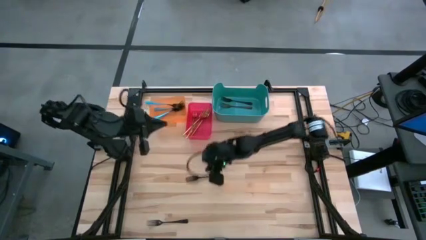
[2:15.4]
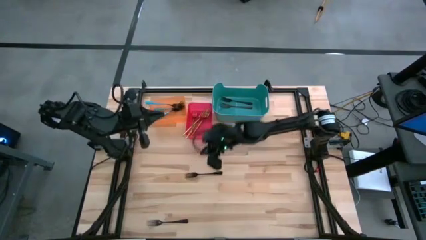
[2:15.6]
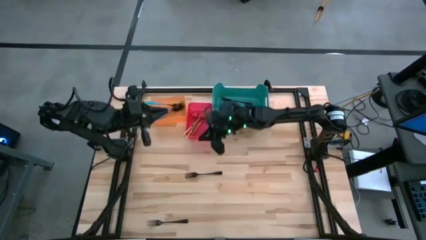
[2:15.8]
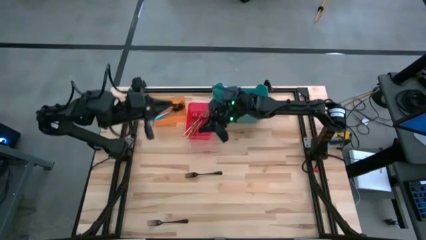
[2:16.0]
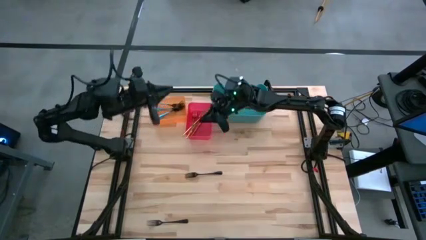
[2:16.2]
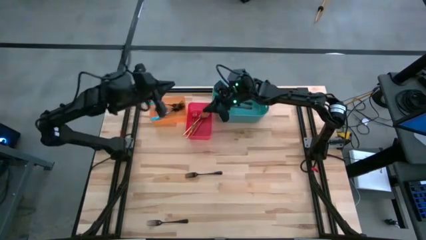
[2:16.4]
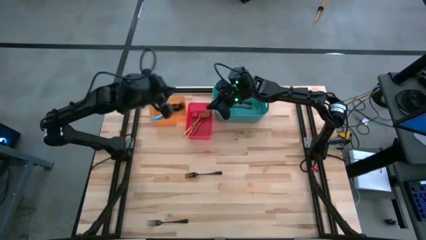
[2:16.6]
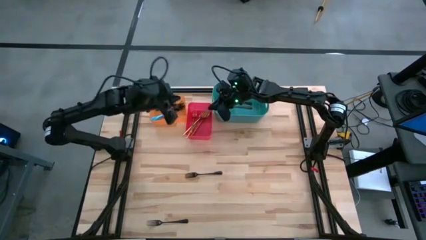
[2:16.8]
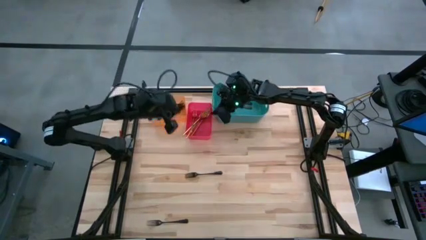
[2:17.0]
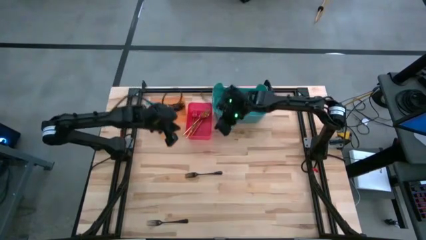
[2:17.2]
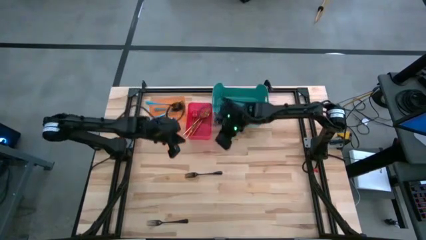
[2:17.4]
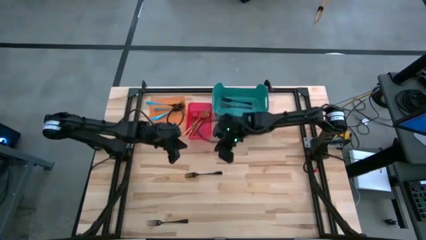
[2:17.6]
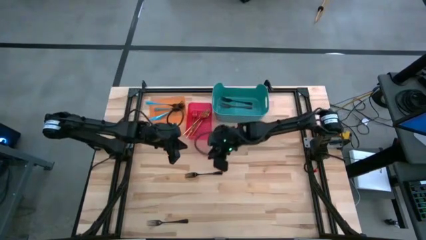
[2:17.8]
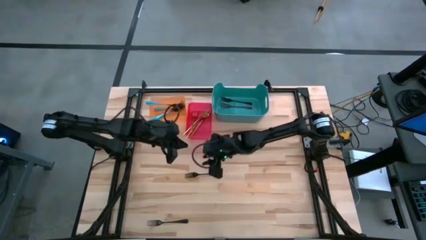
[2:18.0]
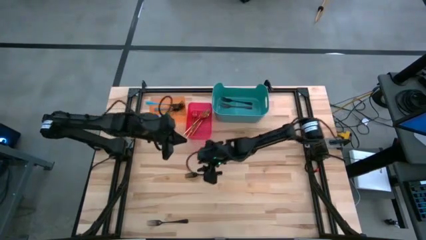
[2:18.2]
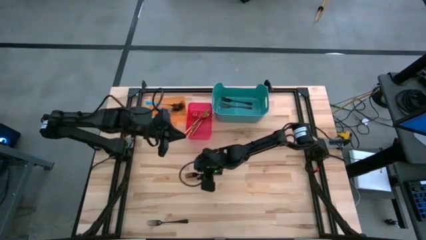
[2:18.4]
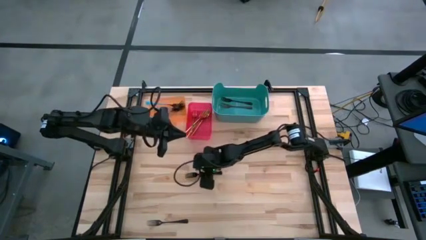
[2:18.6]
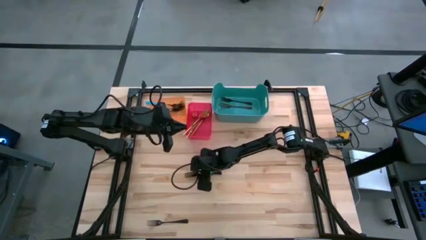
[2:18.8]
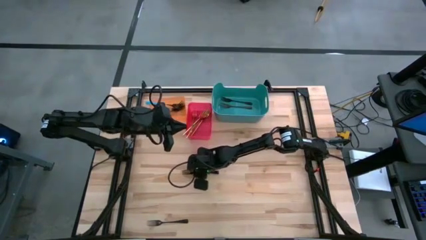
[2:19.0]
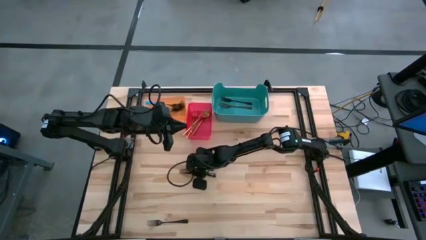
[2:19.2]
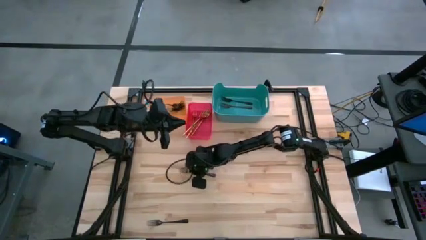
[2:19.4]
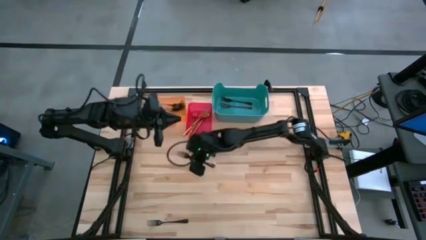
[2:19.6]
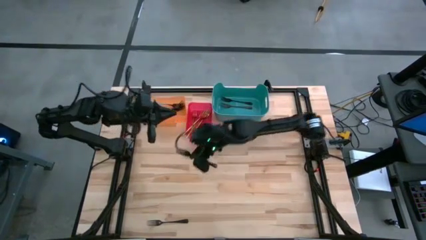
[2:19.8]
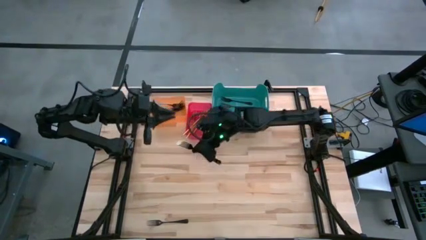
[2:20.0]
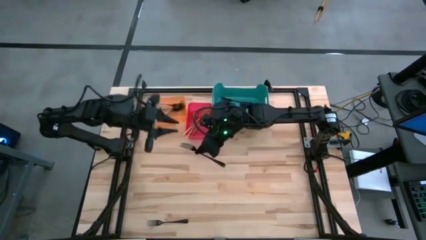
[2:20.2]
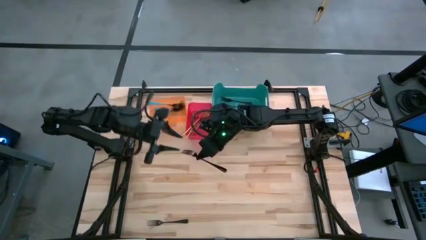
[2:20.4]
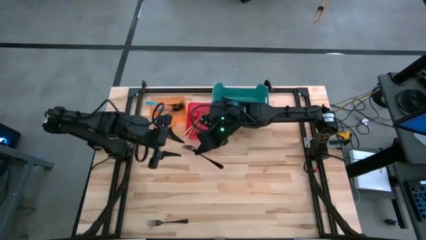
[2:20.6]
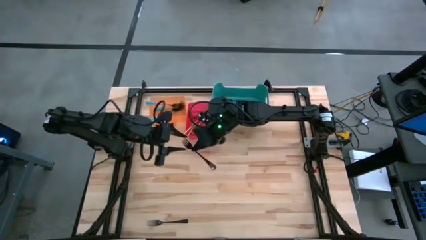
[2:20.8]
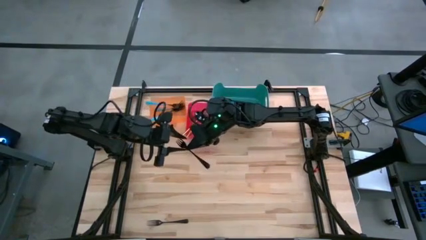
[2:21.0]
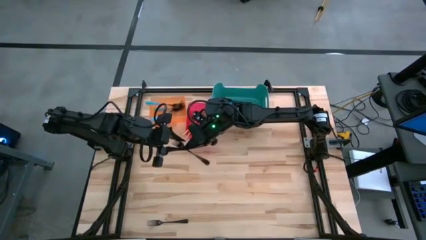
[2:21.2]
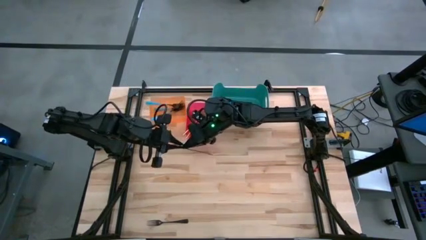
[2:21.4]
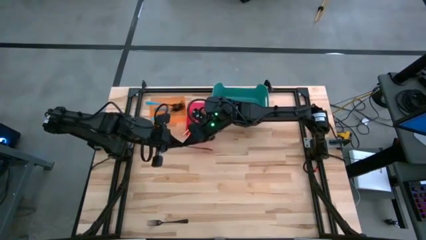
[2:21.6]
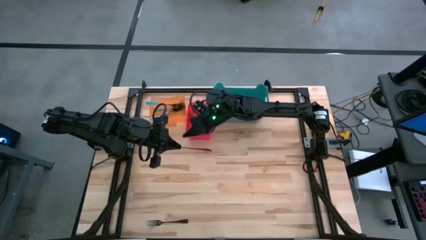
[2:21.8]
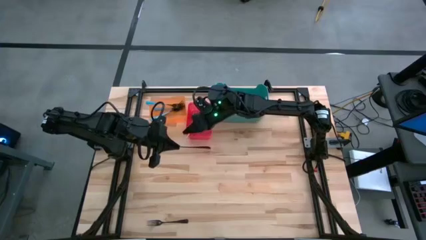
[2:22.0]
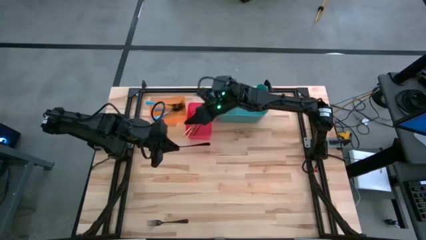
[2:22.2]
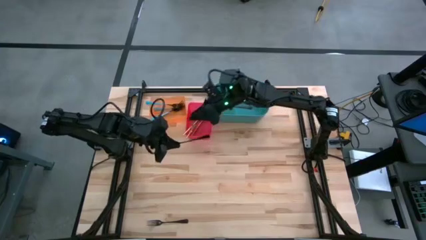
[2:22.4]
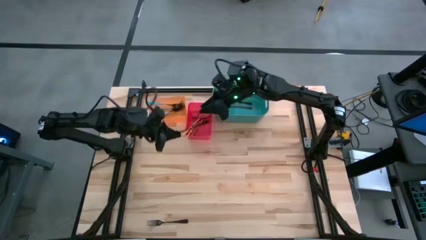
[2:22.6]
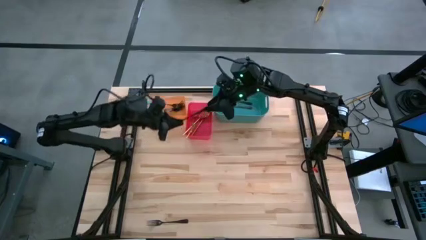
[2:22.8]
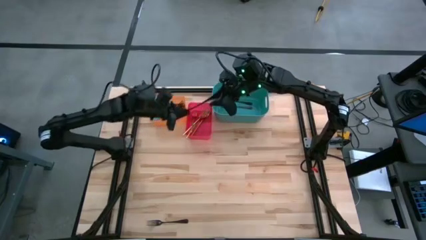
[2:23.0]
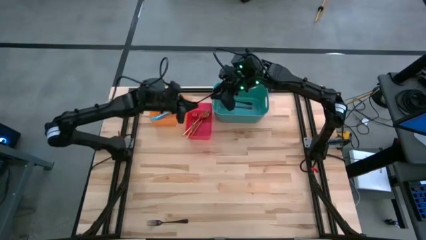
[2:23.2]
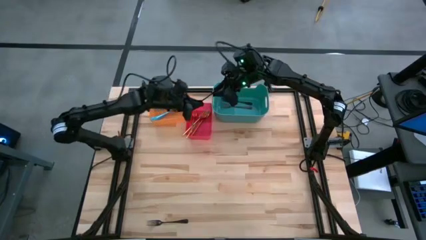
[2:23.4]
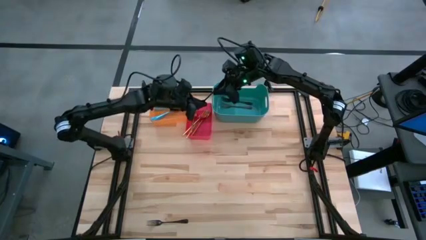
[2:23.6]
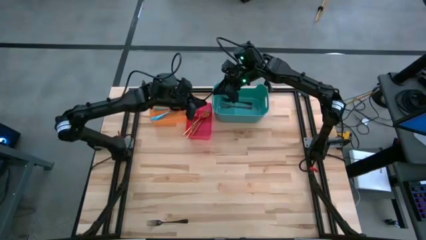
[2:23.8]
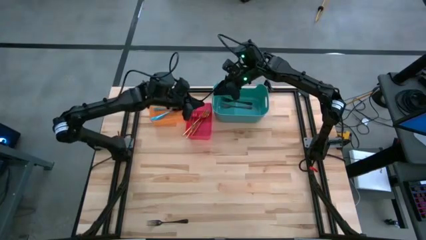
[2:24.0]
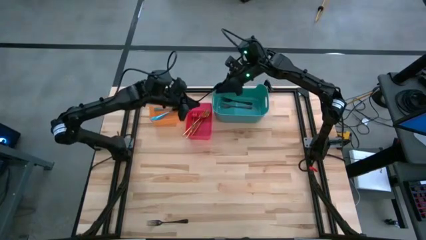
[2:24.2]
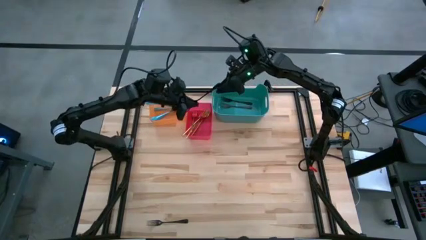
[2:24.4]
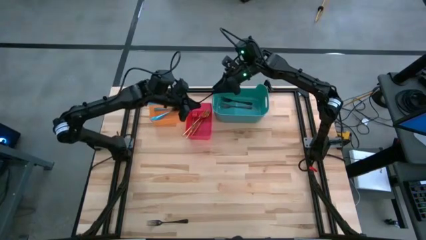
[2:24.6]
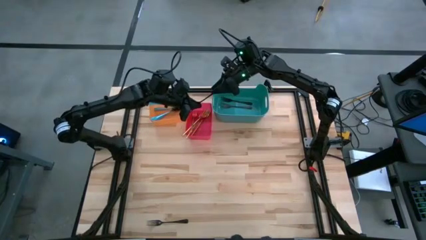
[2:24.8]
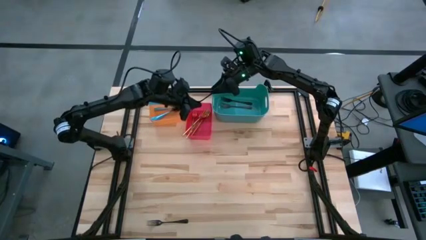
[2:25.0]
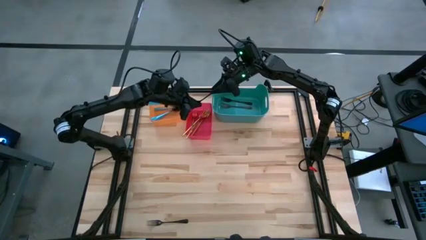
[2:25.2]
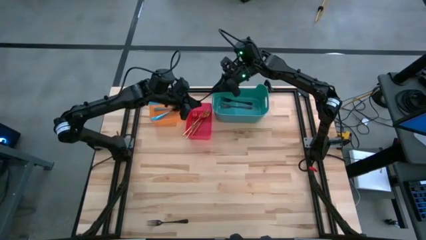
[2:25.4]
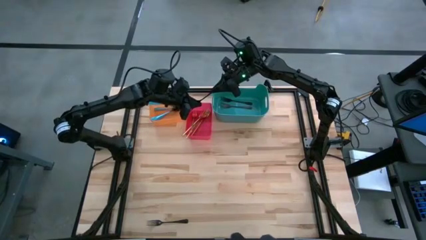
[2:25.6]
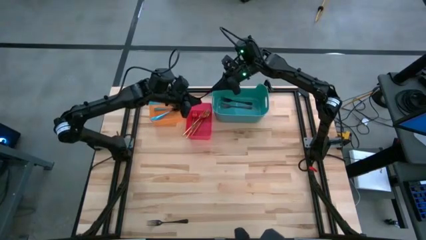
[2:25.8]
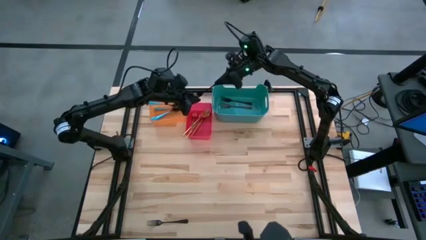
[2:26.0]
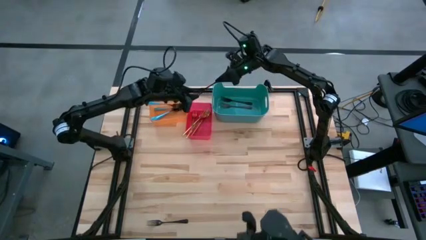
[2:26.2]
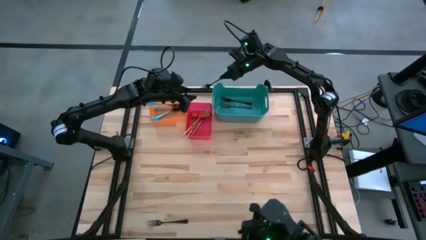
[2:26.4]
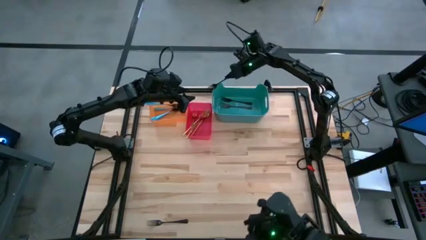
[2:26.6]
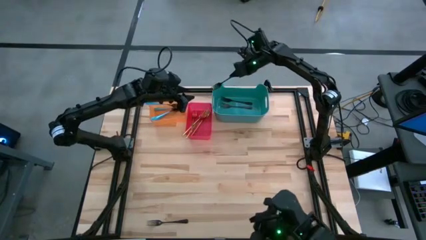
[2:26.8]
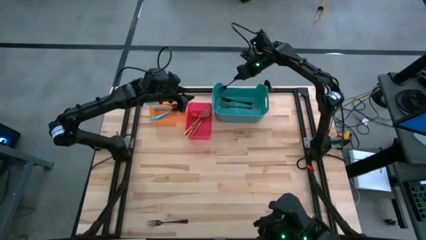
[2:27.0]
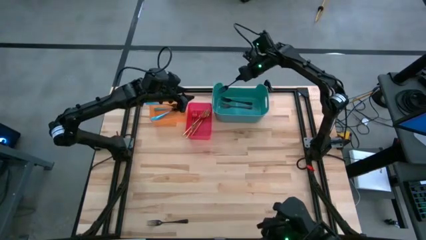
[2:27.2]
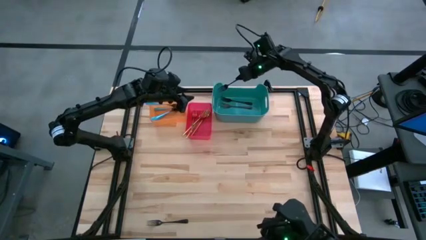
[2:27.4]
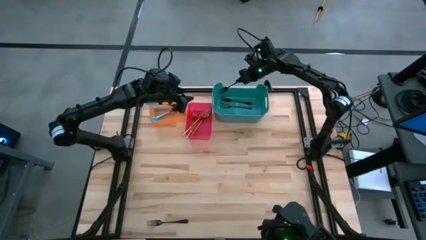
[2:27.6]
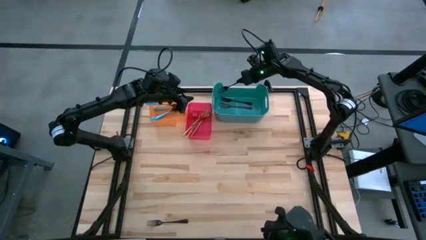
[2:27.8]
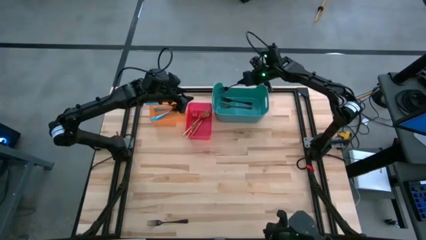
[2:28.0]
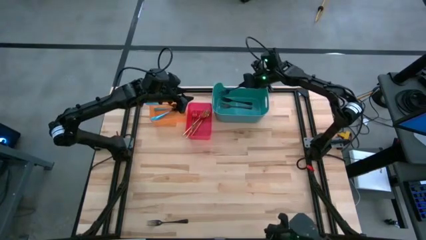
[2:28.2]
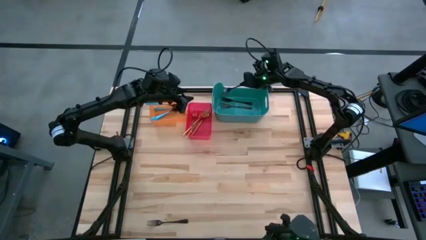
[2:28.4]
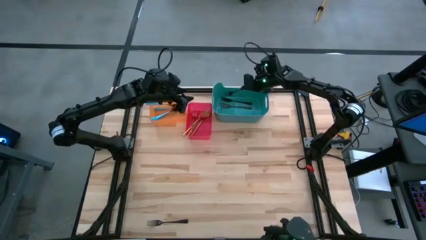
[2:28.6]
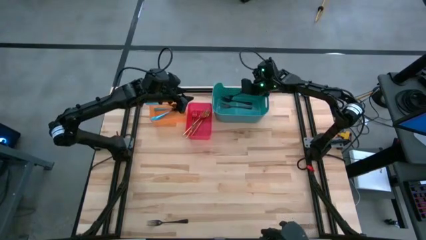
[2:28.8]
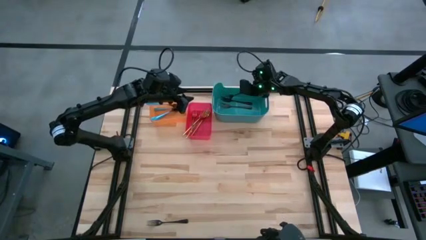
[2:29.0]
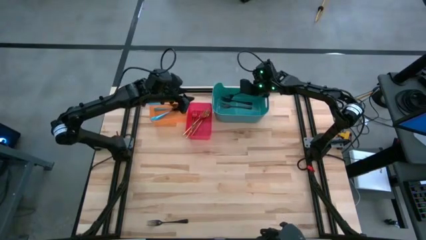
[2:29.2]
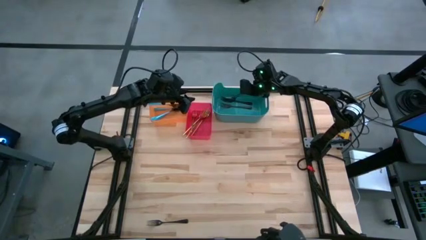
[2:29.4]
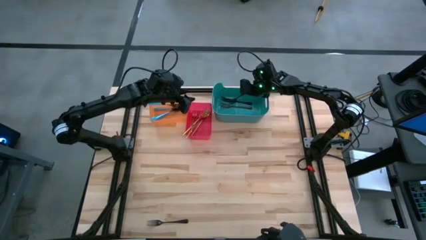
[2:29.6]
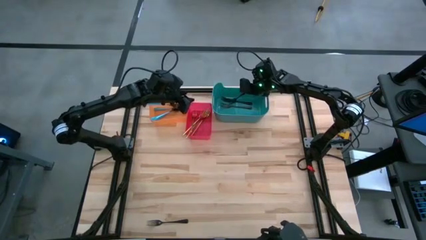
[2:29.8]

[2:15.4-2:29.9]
Task: Sort silverware by color (type)
Put the black fork into the green bin
